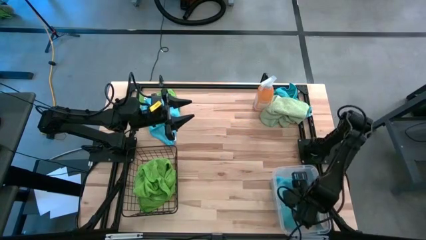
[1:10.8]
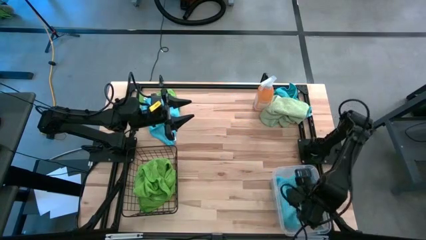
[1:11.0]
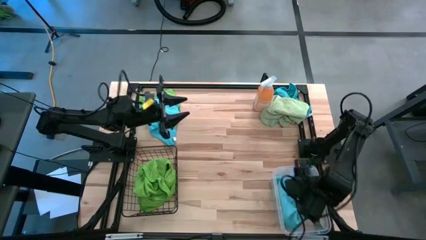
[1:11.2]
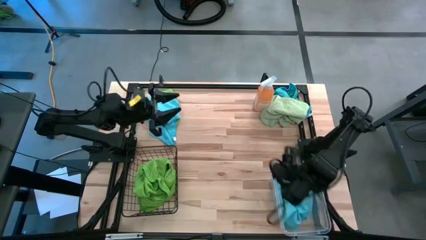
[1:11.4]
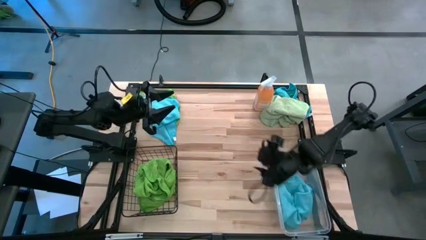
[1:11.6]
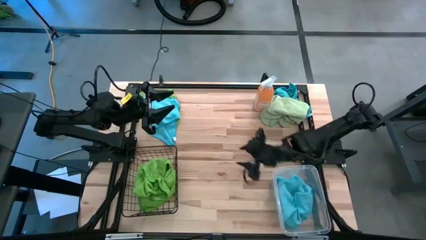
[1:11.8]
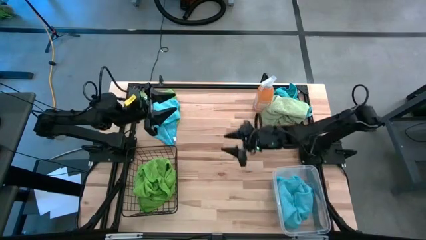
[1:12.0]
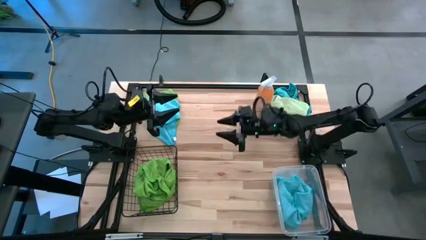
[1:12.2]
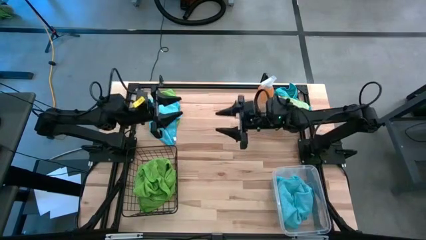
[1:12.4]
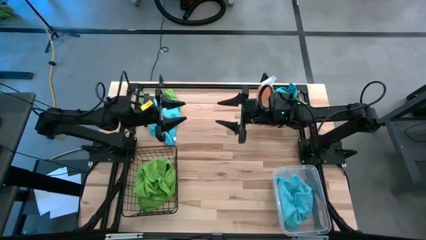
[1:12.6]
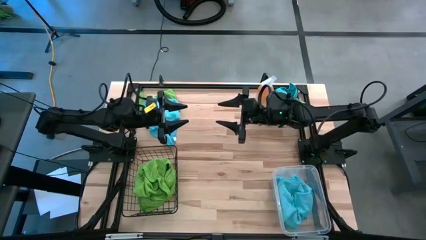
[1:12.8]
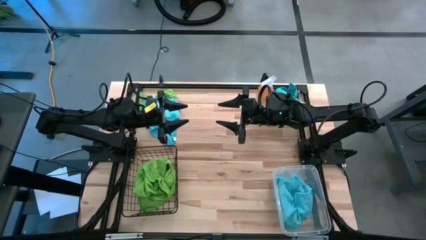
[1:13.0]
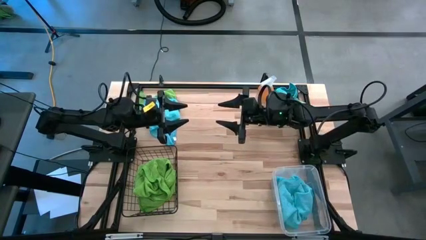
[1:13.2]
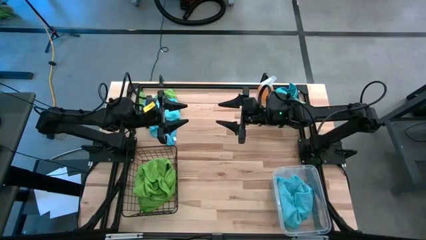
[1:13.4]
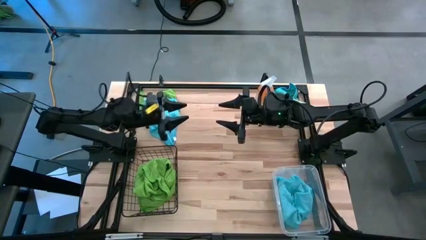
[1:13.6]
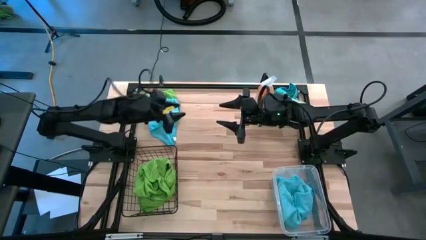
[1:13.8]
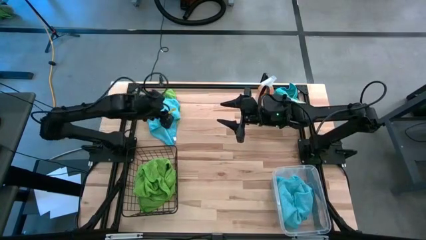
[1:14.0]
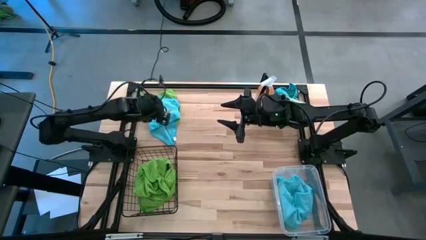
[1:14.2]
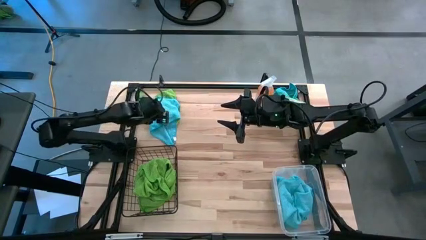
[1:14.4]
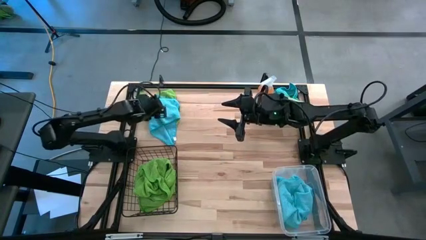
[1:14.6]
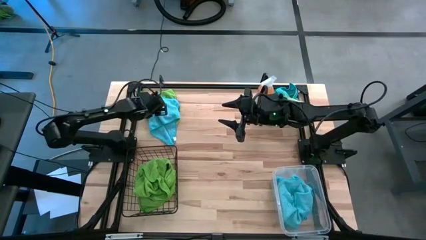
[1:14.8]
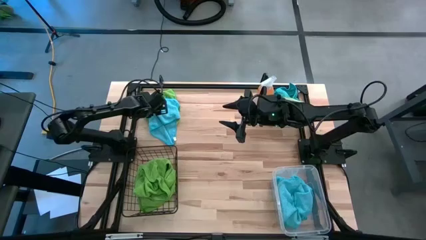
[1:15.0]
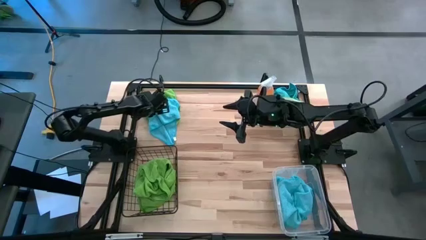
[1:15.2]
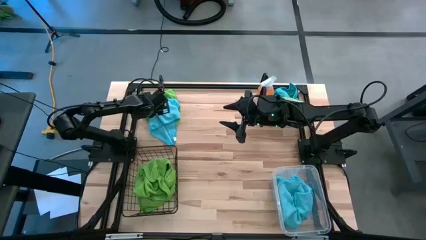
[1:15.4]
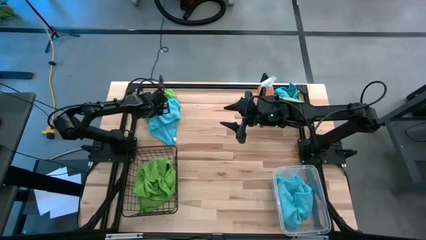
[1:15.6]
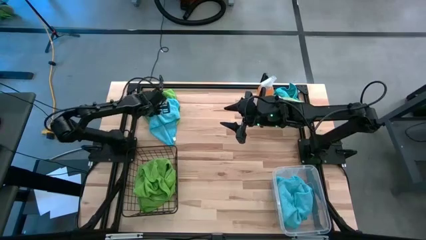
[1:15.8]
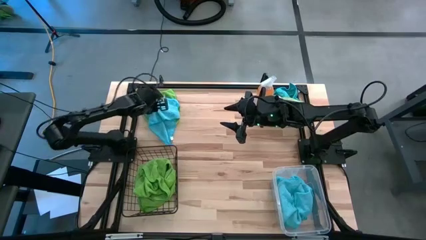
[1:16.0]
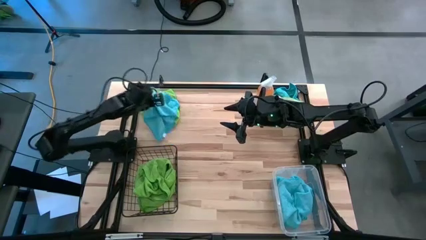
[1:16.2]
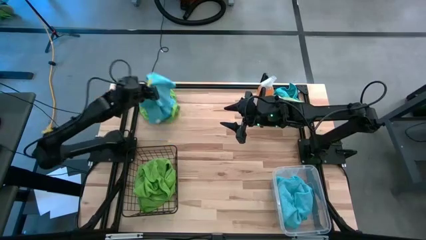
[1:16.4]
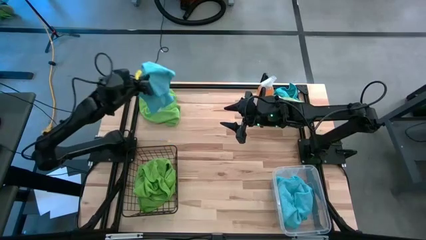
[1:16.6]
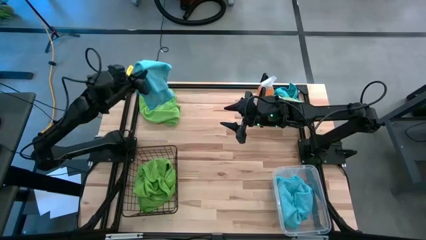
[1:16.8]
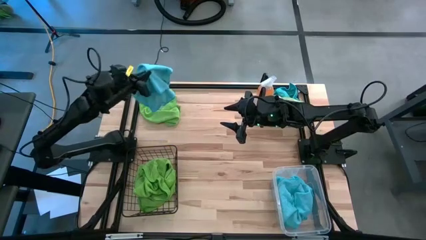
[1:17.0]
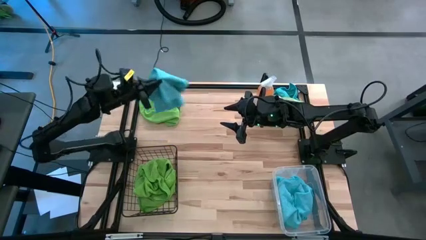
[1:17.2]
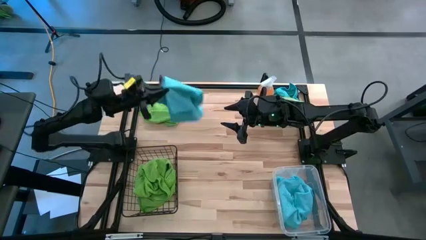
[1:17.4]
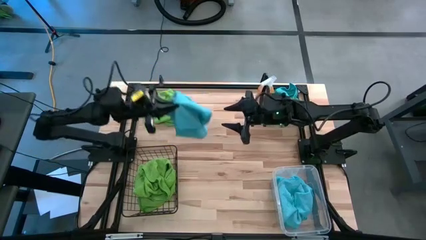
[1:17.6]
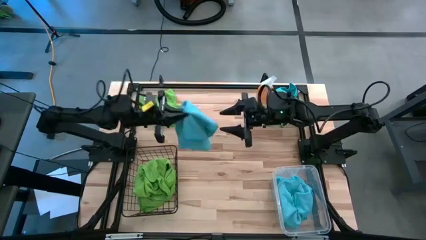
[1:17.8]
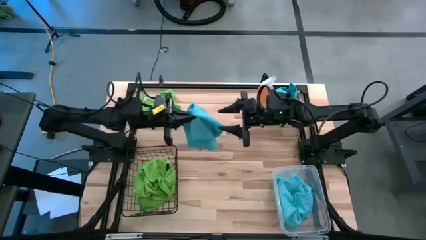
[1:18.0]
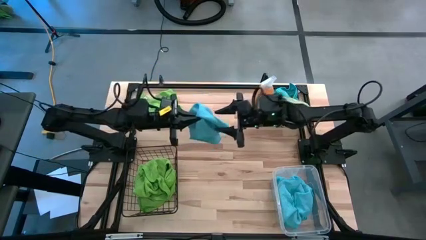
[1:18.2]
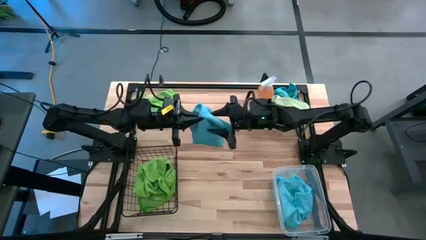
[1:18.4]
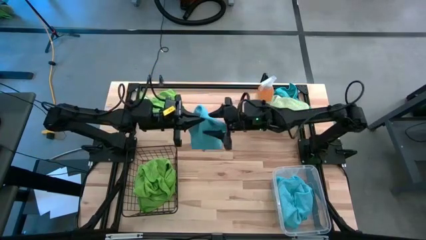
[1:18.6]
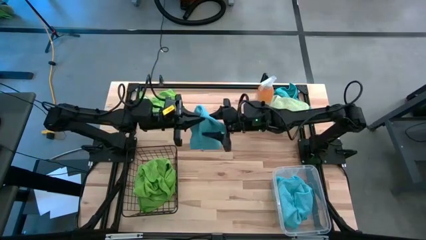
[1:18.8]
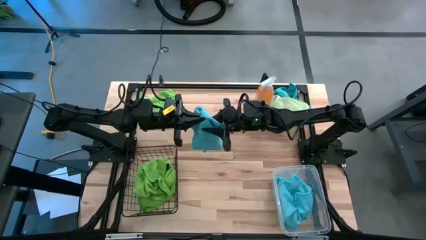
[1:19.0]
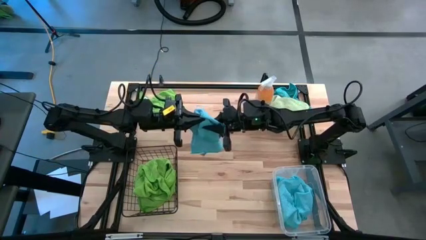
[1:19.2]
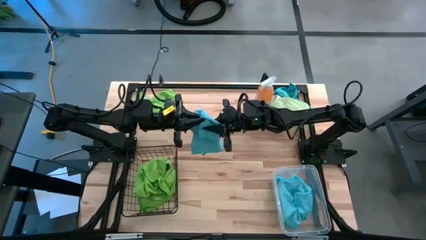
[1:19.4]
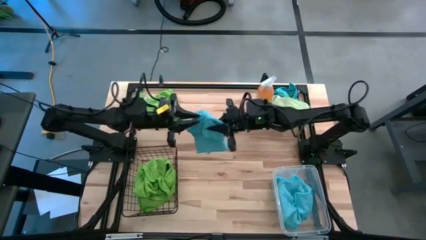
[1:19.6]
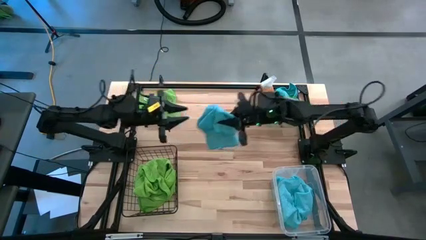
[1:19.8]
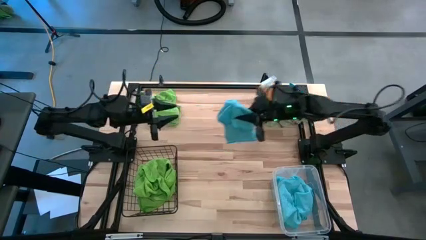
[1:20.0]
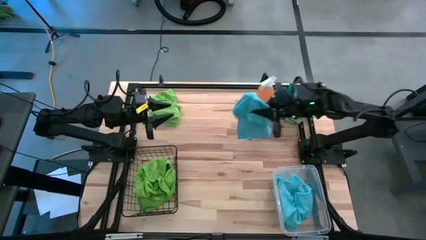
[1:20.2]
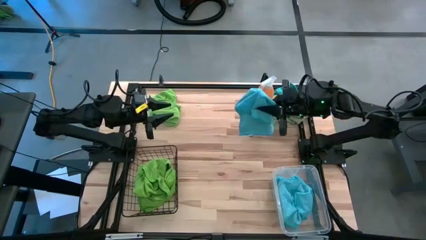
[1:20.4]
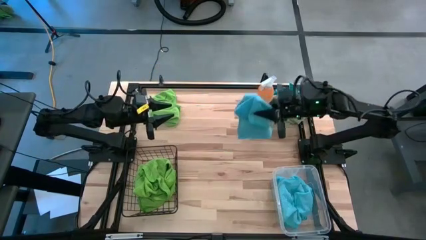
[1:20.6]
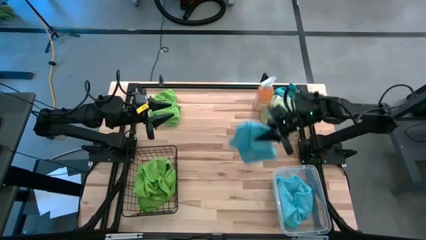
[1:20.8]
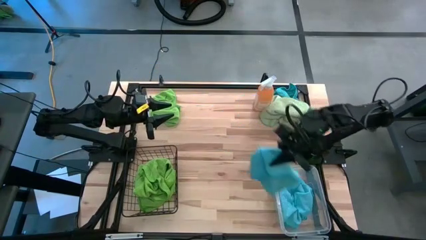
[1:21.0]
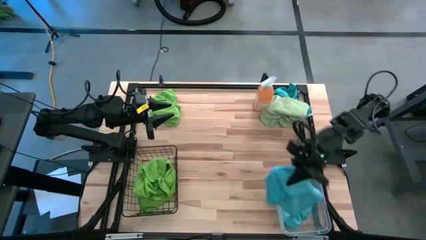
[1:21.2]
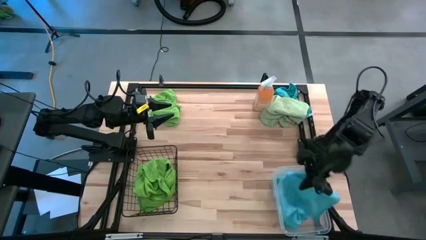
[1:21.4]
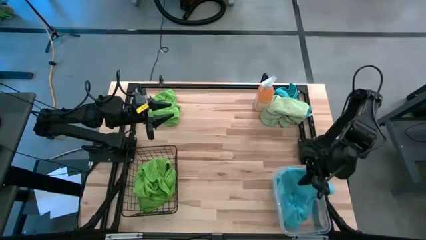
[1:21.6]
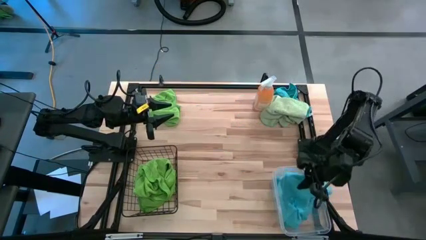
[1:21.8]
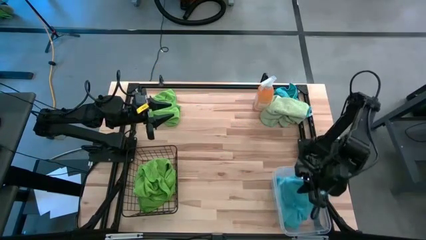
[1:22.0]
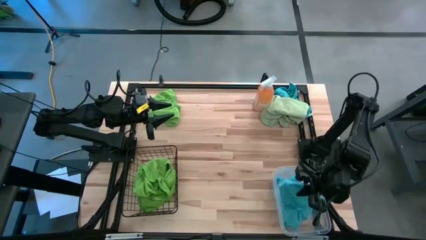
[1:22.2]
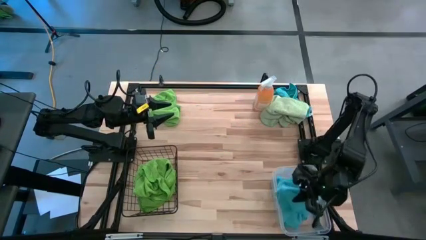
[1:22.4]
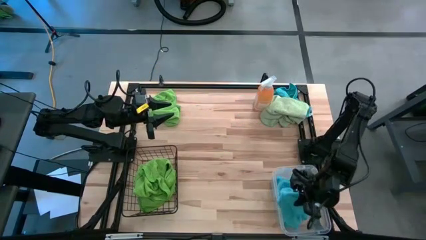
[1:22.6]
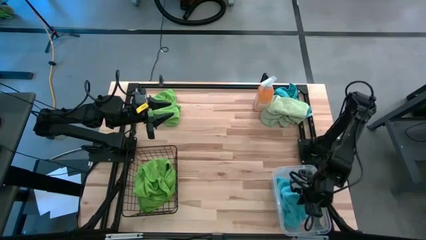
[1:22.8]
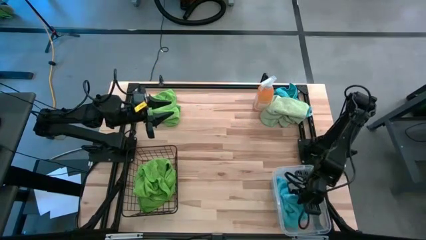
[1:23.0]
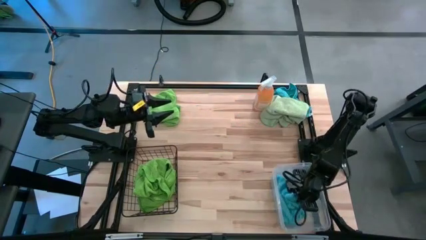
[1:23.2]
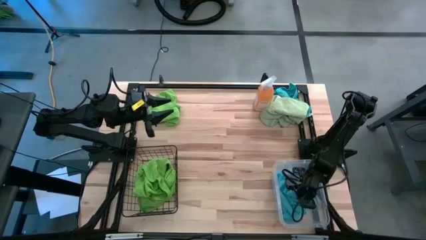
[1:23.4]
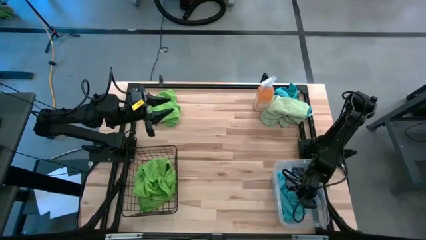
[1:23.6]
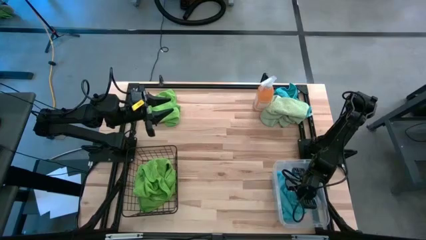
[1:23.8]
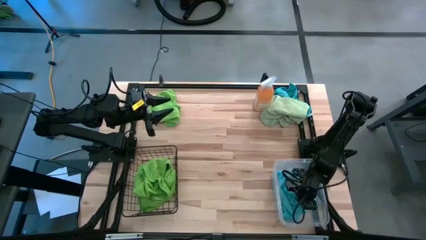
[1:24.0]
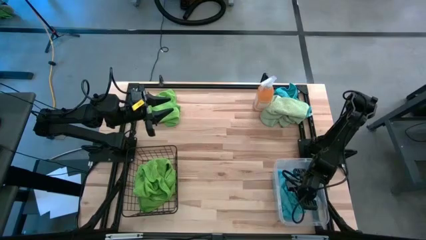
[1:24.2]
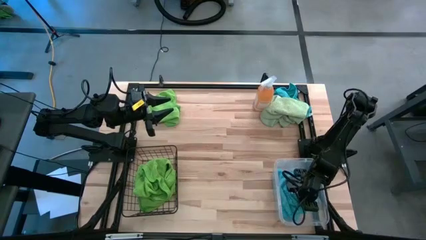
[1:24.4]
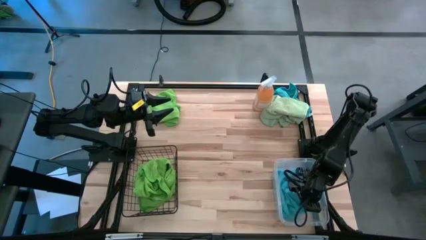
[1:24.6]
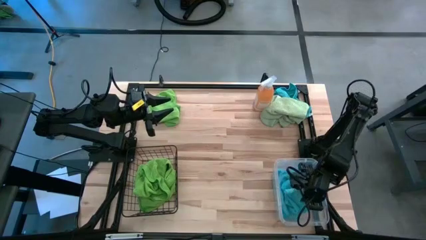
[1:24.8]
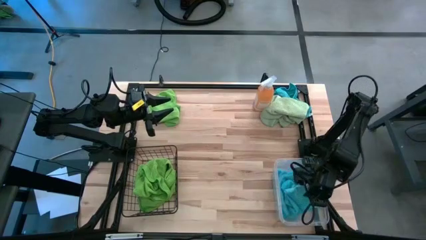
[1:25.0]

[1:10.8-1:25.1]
Task: Sort microfiber towel by color & place in baskets
Put the blue microfiber cloth into the transparent bin
